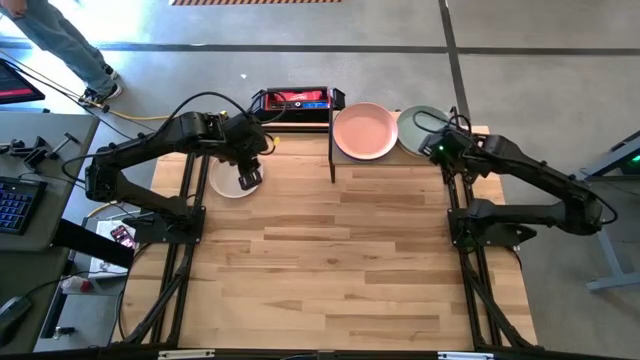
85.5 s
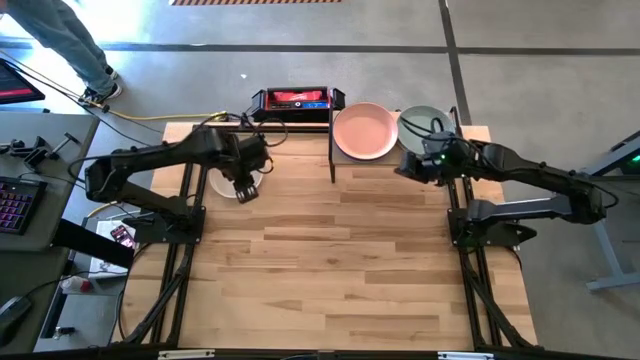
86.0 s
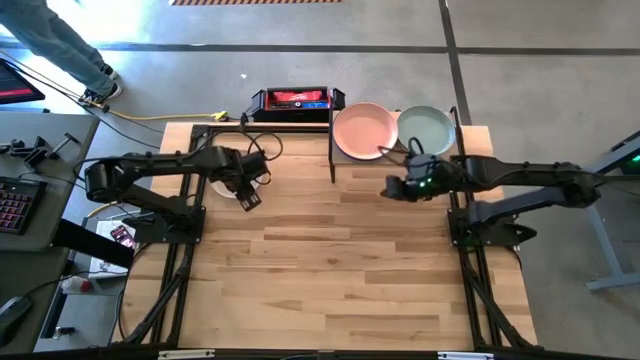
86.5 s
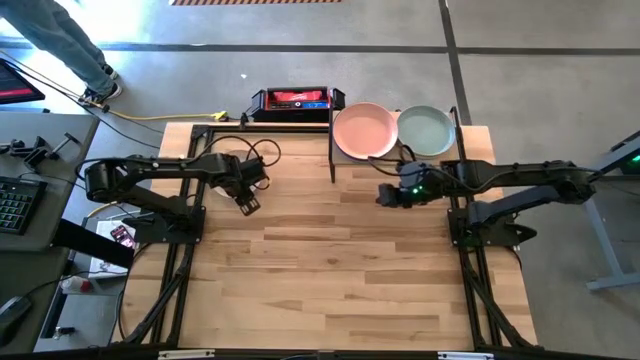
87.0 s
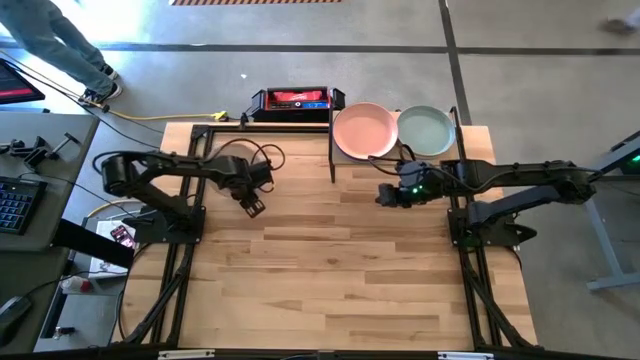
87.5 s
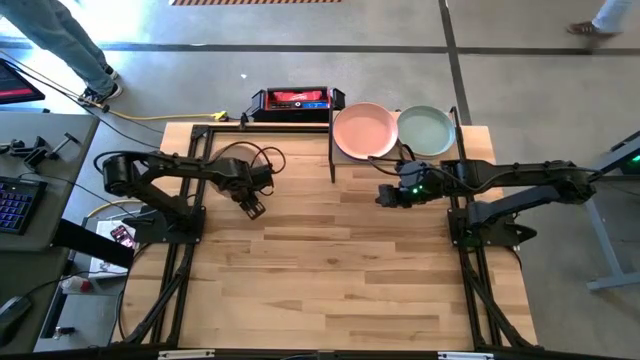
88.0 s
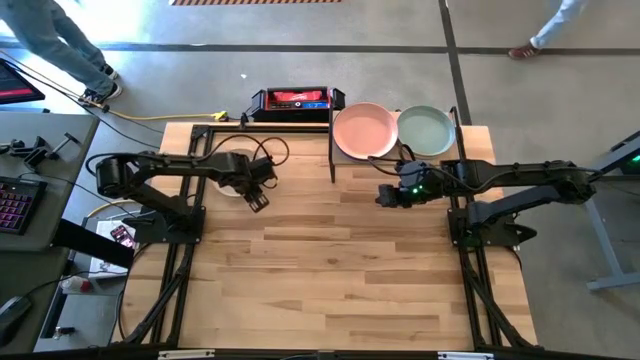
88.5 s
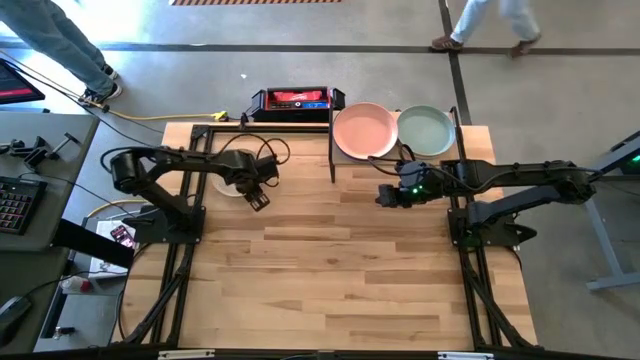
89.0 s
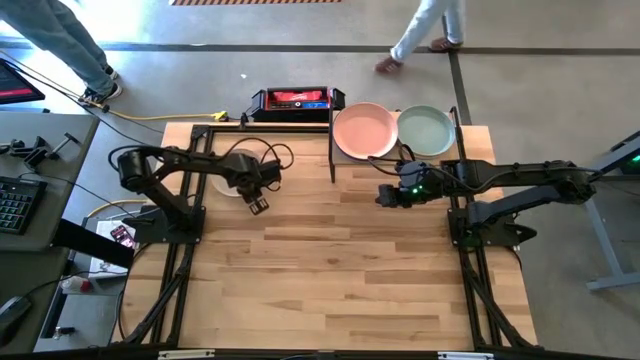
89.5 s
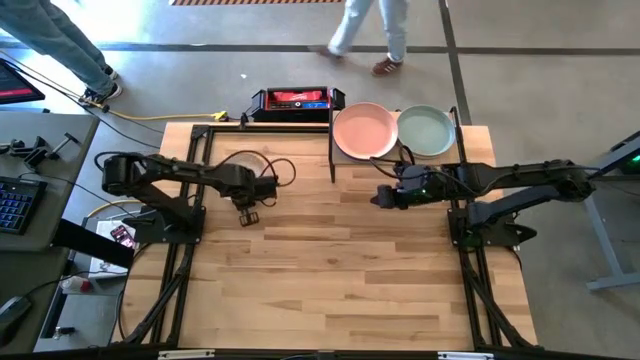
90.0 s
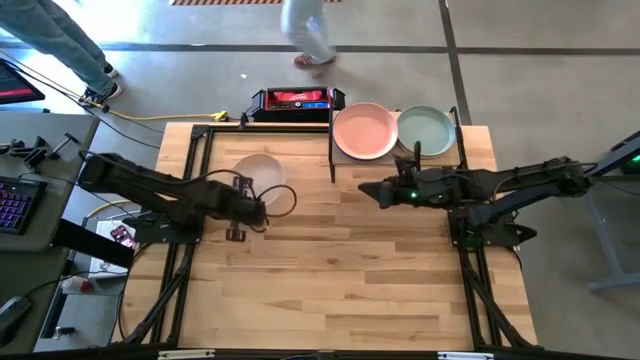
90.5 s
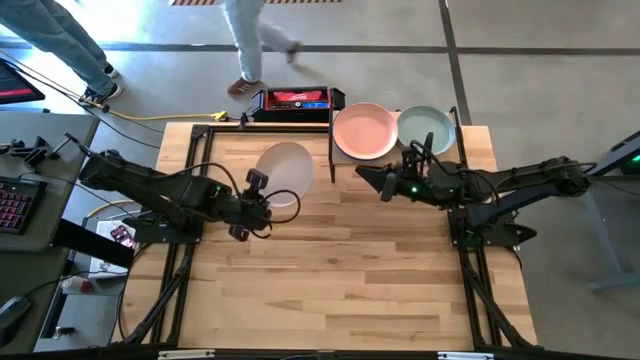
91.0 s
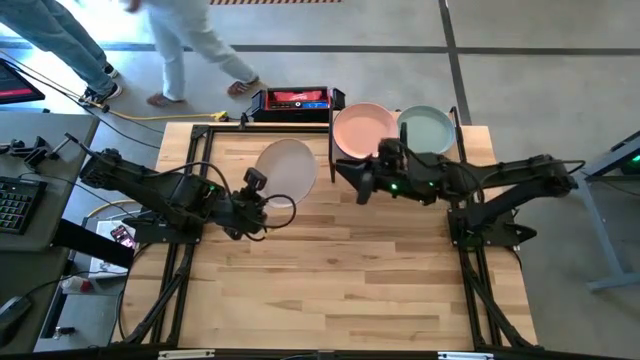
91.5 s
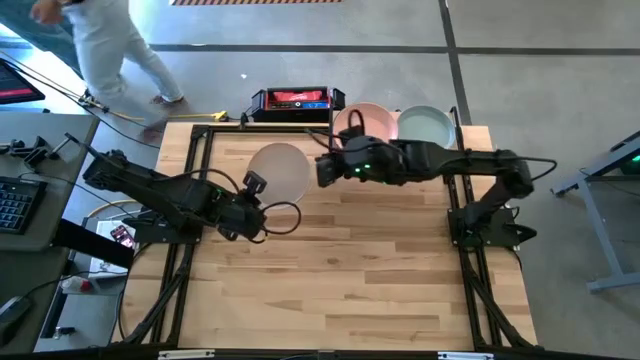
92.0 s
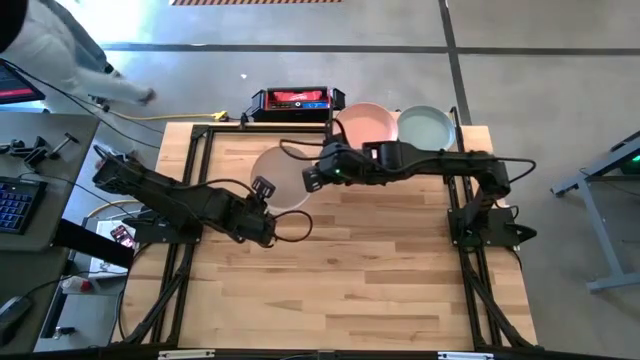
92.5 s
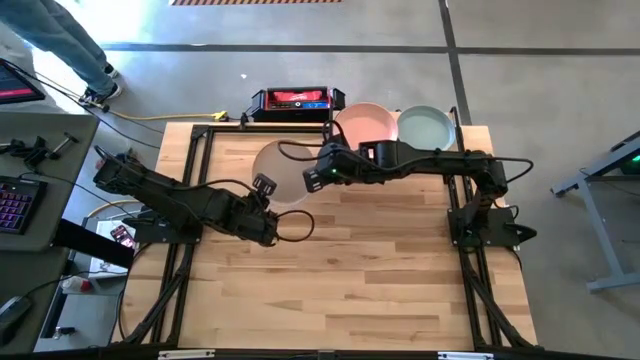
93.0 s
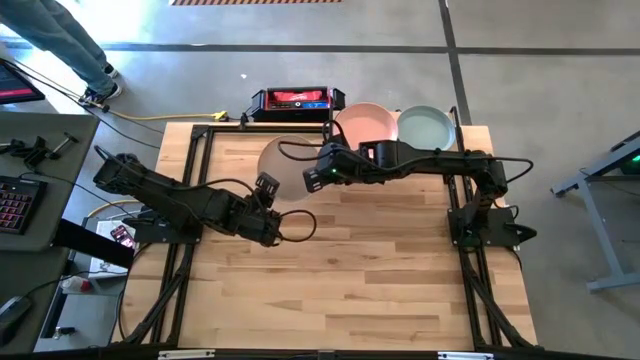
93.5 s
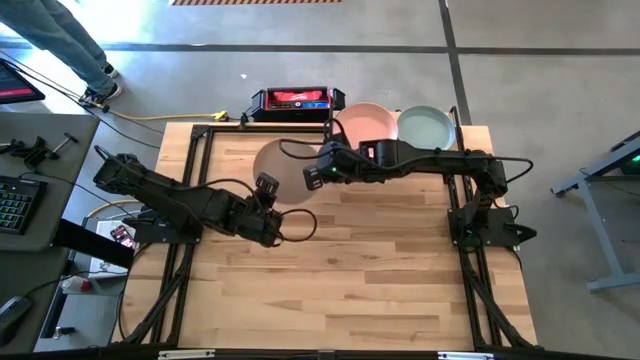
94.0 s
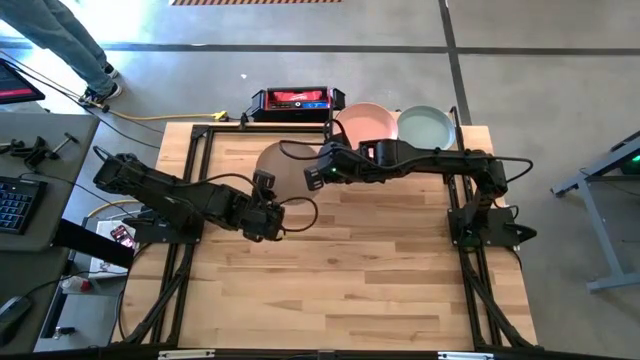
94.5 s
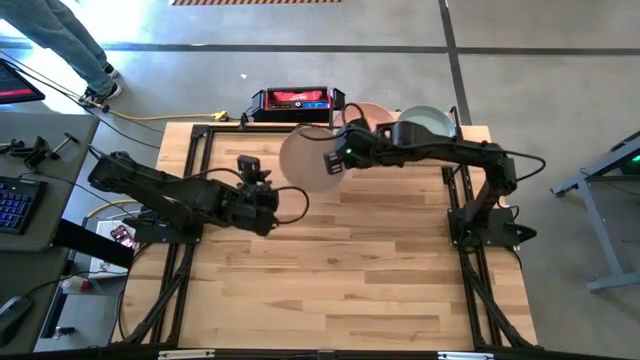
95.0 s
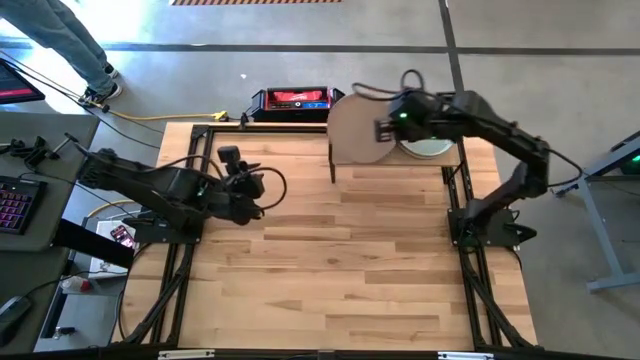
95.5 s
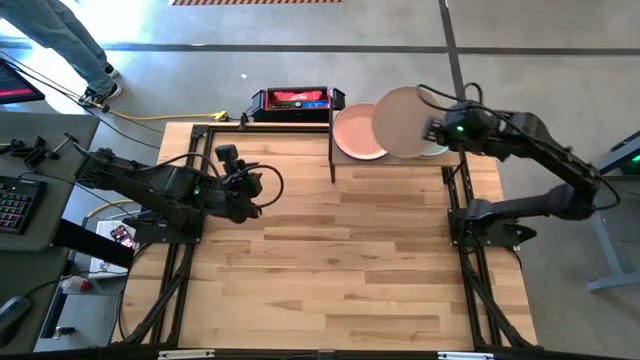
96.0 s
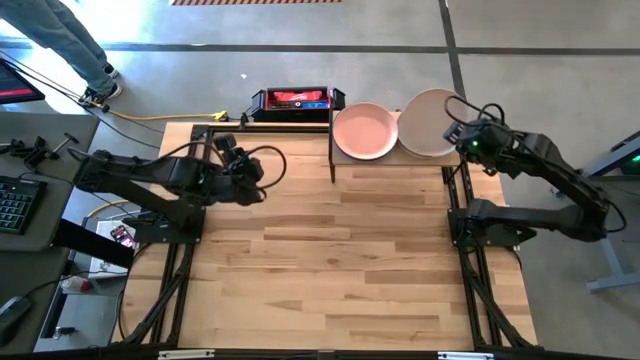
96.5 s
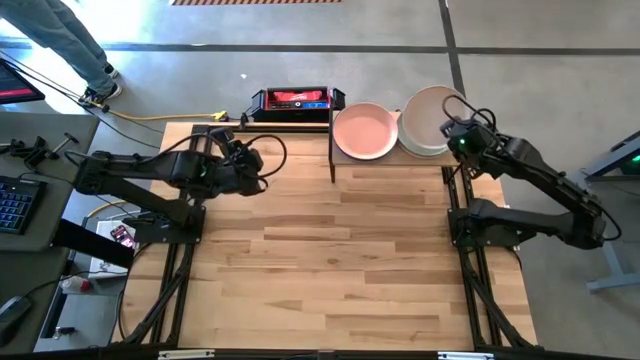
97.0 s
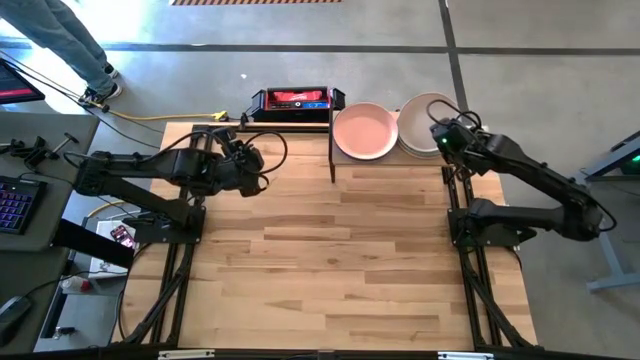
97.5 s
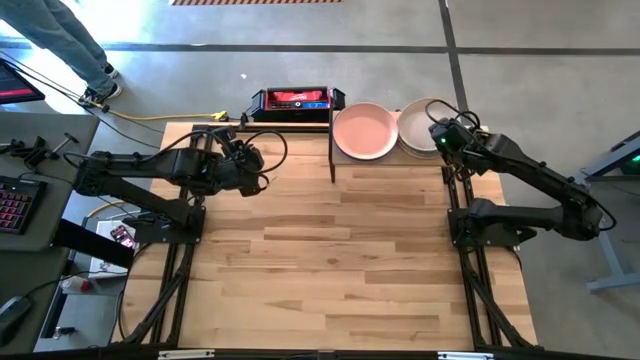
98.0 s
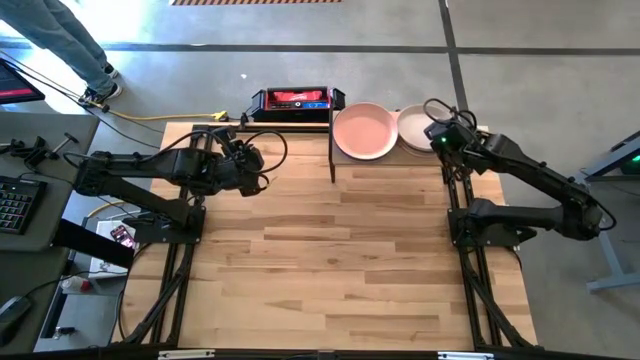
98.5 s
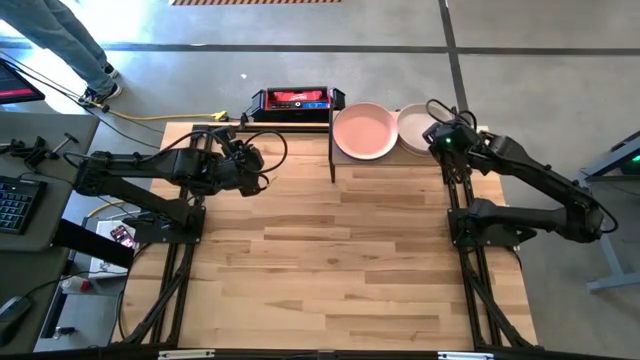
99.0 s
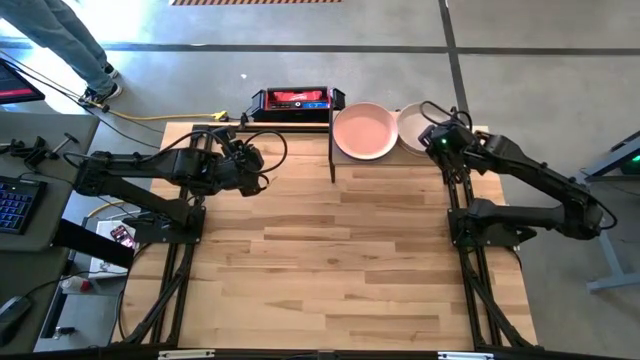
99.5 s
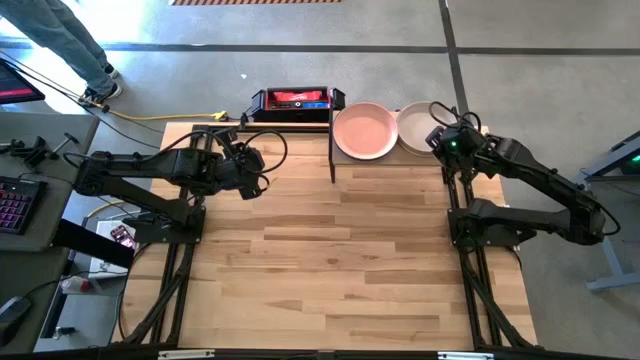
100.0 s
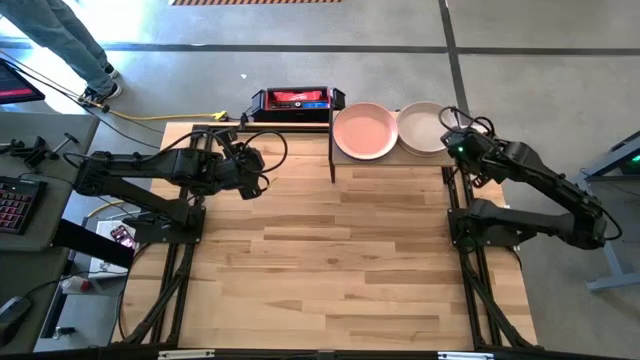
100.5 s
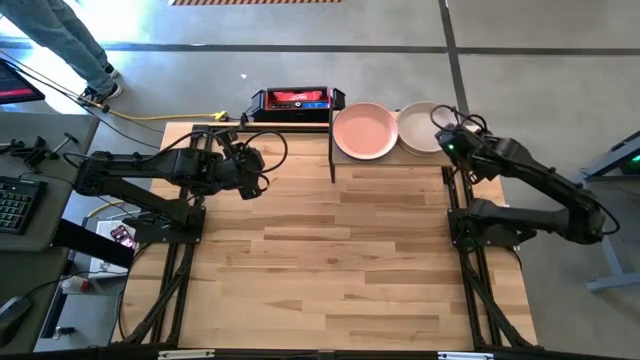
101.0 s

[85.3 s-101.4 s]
Task: Place and stack plates onto a shelf
Stack the gray plate on top of the green plate on the shelf

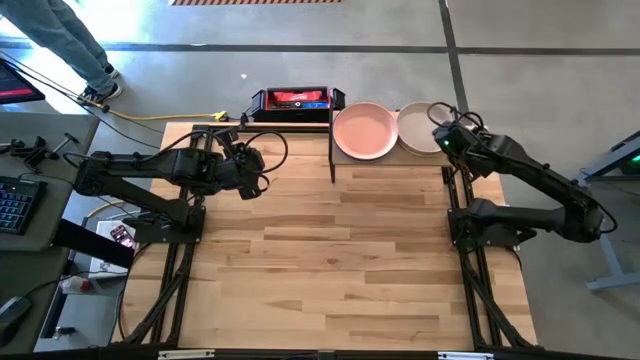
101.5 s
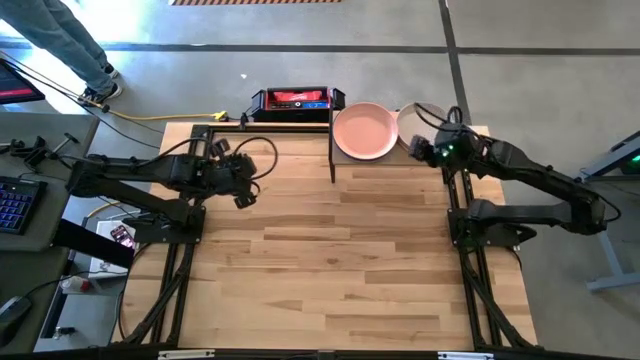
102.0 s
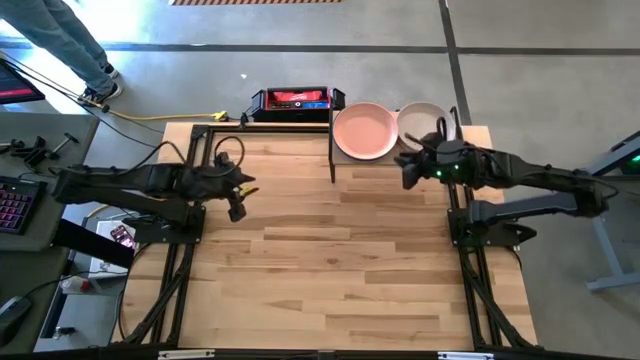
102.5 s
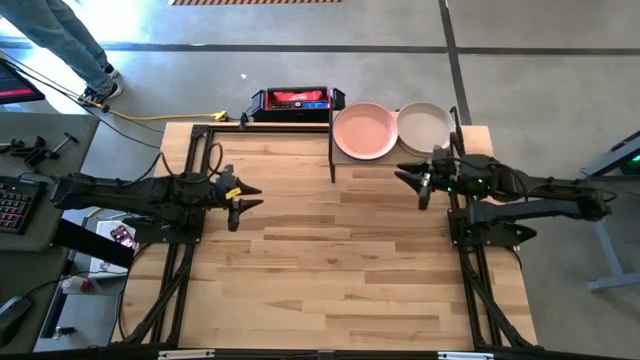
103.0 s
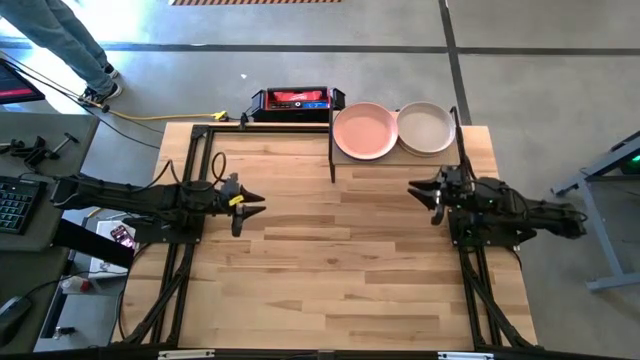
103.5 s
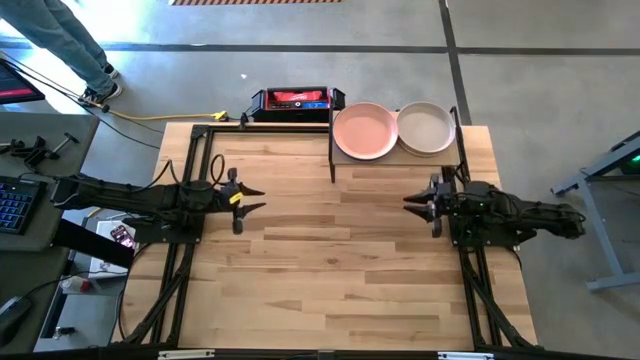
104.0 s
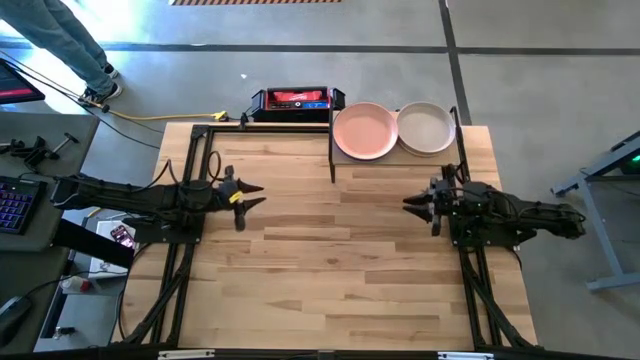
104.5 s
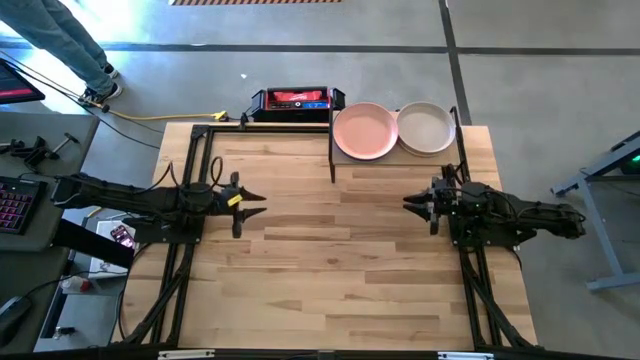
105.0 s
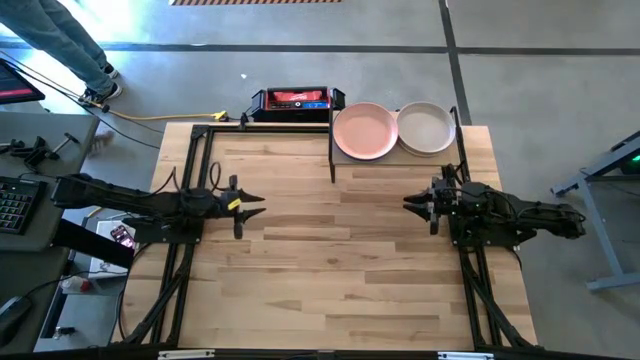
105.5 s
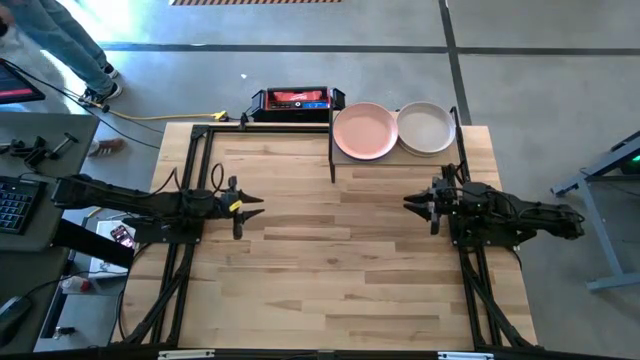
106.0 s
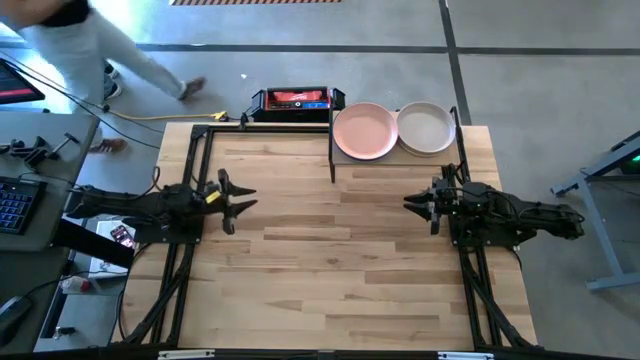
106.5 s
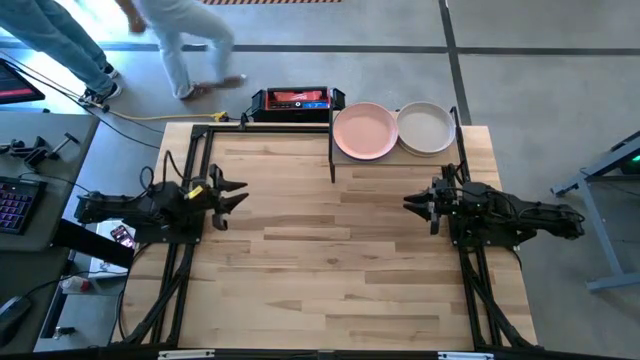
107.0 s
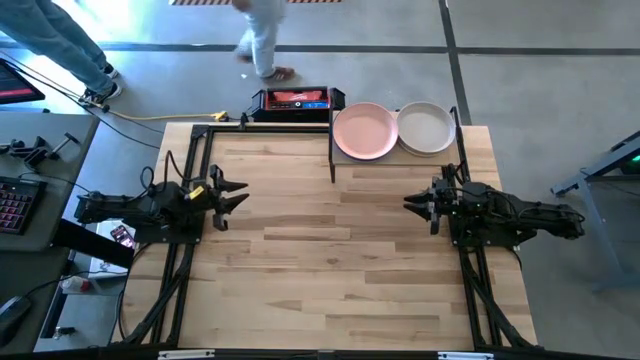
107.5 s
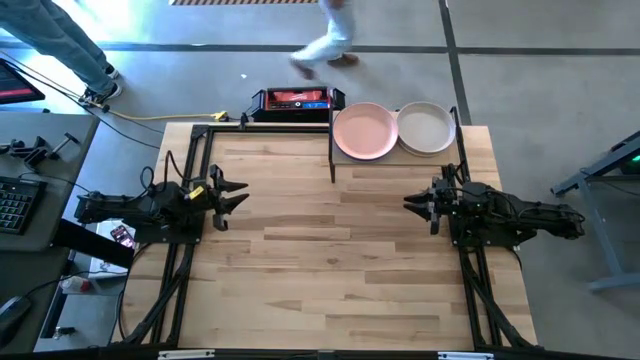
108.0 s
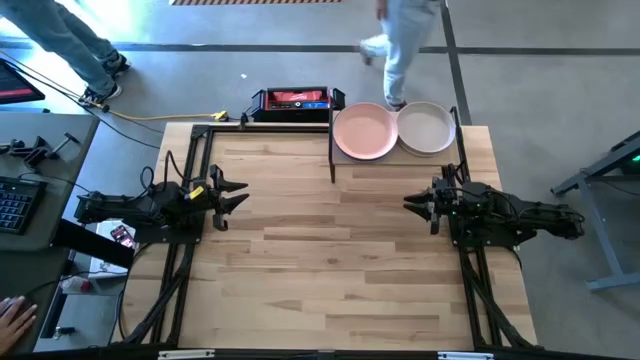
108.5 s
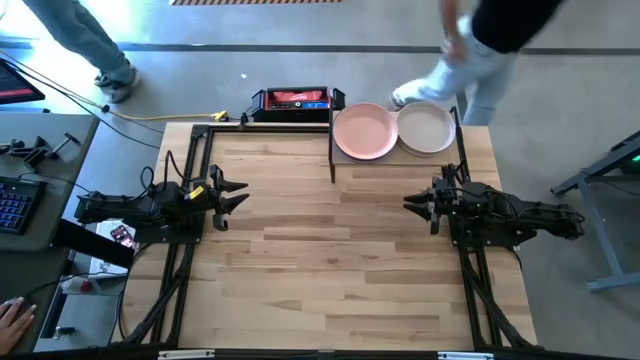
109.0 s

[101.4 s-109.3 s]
Return to Home Position
